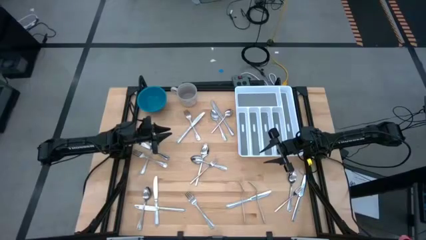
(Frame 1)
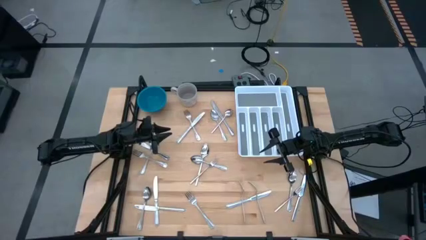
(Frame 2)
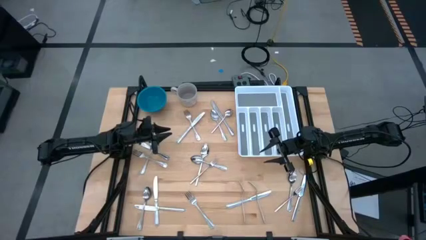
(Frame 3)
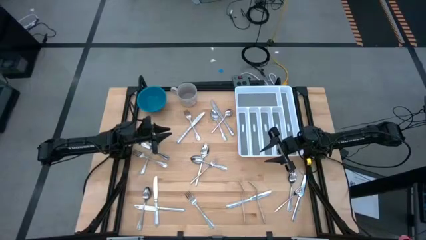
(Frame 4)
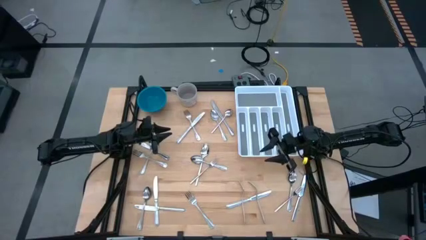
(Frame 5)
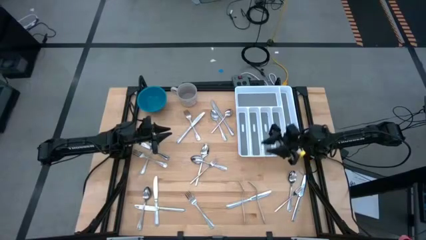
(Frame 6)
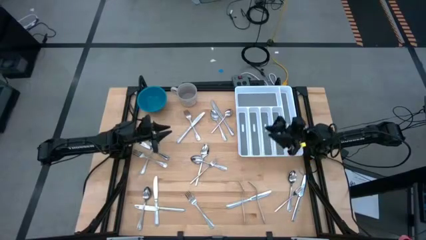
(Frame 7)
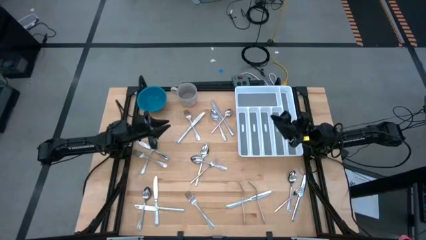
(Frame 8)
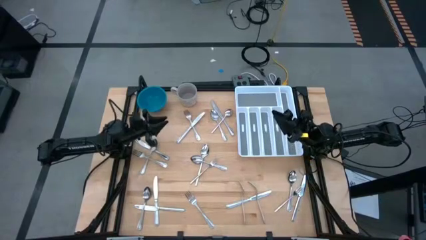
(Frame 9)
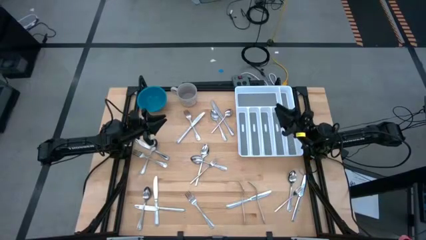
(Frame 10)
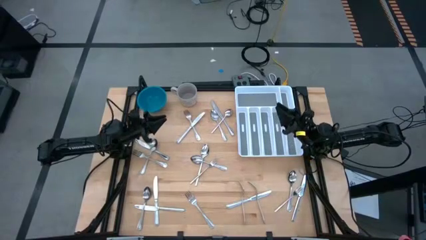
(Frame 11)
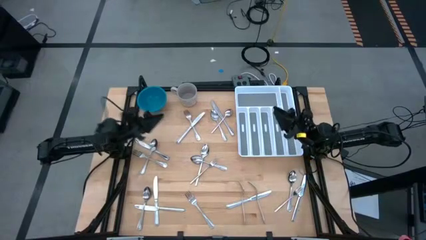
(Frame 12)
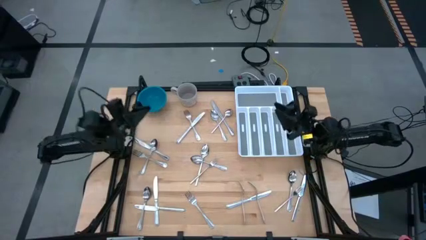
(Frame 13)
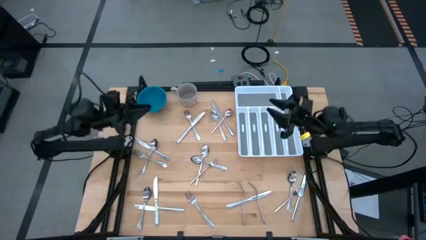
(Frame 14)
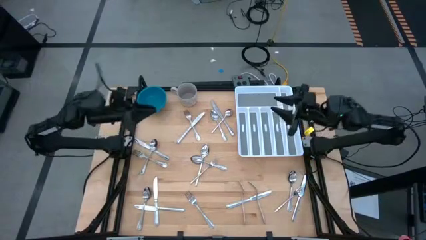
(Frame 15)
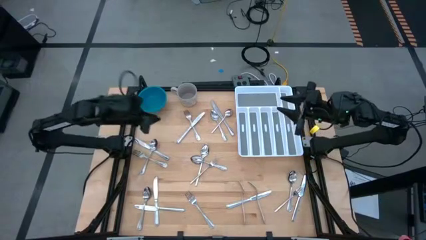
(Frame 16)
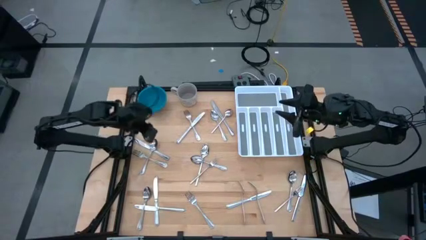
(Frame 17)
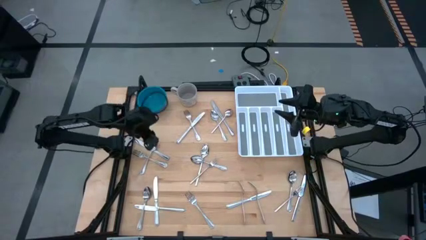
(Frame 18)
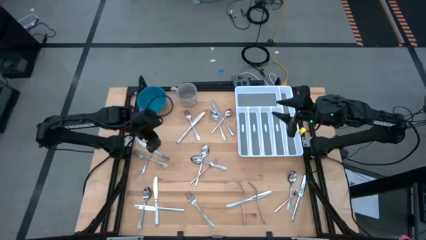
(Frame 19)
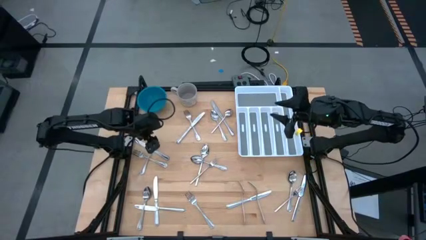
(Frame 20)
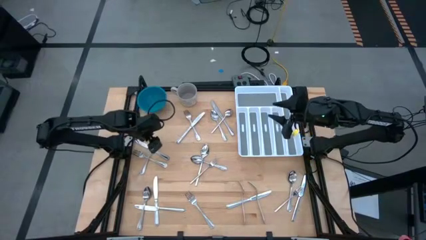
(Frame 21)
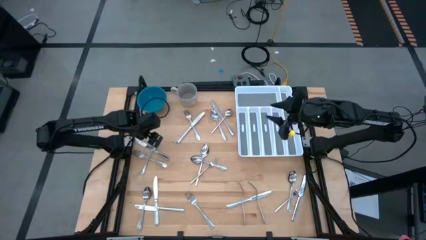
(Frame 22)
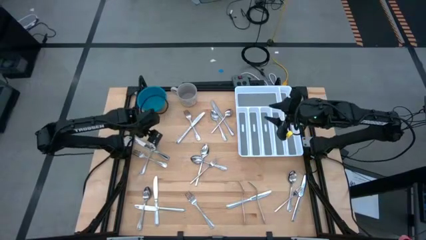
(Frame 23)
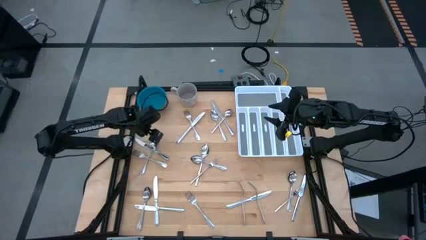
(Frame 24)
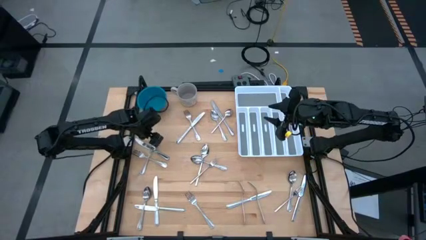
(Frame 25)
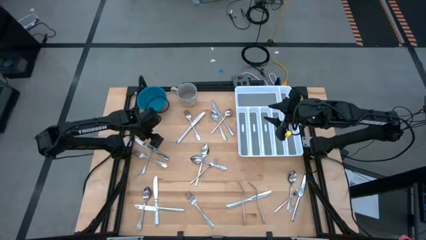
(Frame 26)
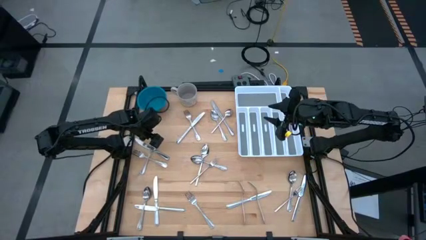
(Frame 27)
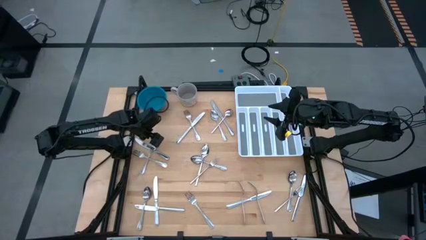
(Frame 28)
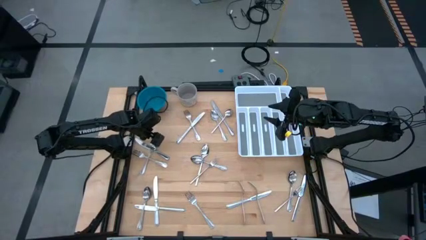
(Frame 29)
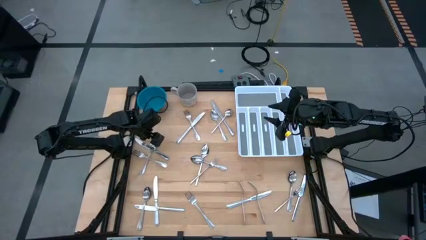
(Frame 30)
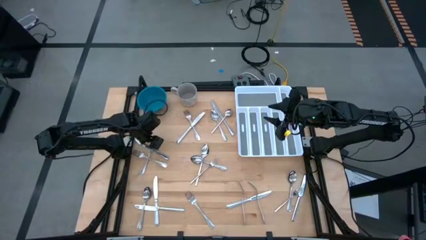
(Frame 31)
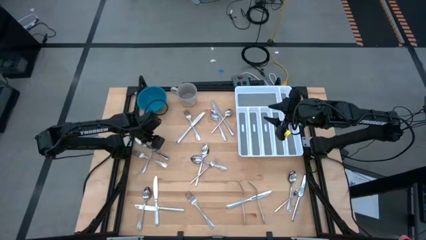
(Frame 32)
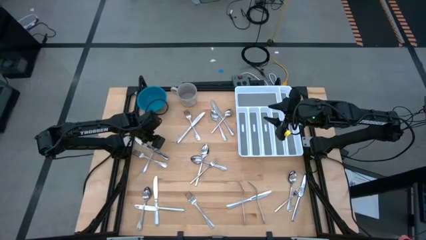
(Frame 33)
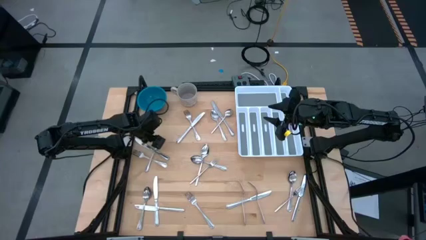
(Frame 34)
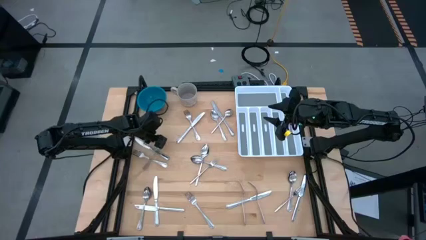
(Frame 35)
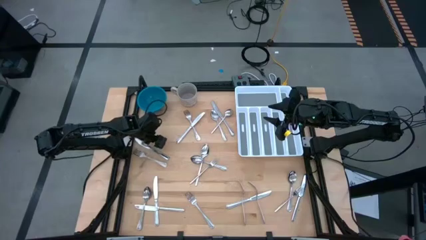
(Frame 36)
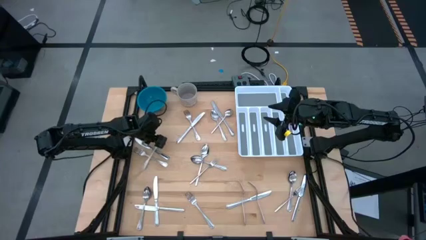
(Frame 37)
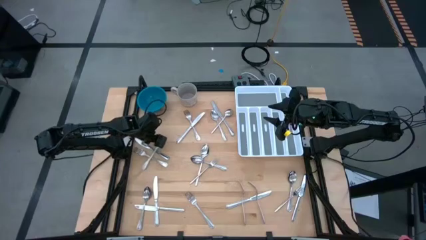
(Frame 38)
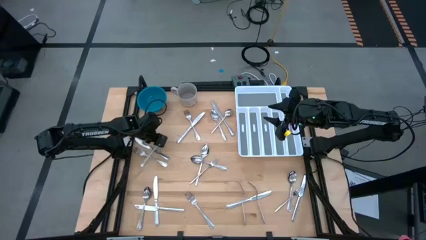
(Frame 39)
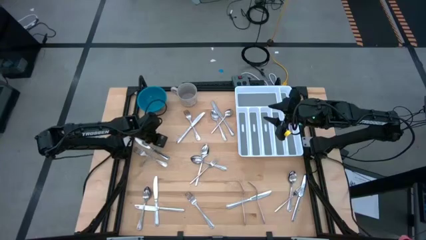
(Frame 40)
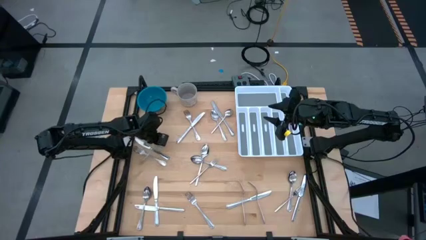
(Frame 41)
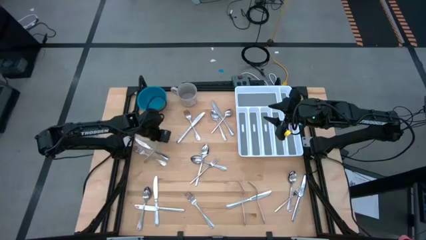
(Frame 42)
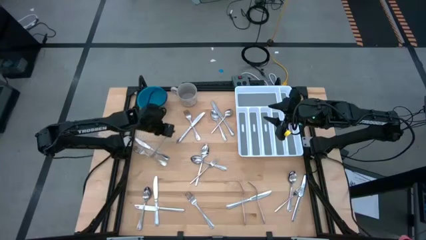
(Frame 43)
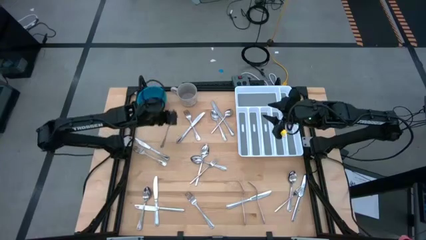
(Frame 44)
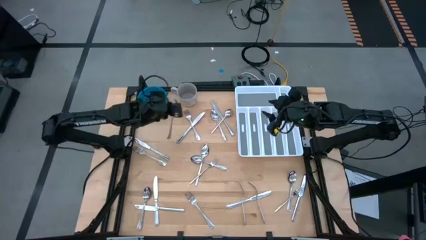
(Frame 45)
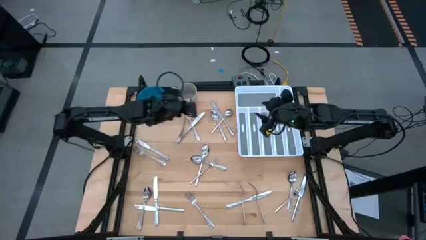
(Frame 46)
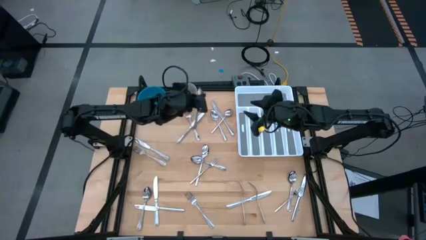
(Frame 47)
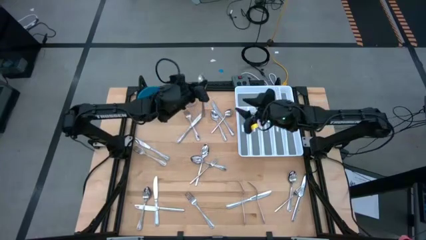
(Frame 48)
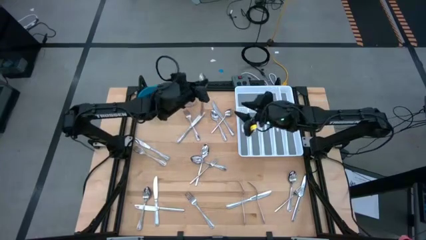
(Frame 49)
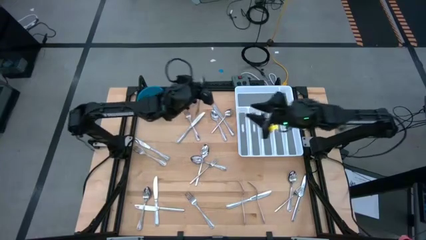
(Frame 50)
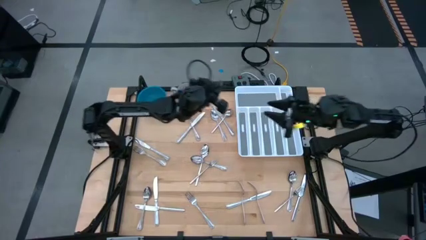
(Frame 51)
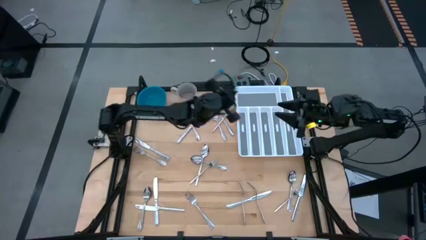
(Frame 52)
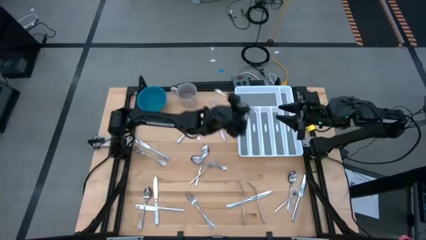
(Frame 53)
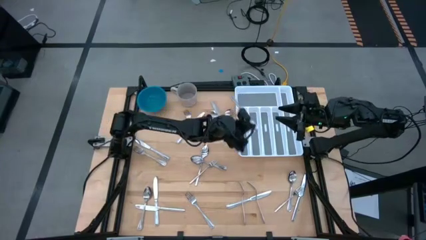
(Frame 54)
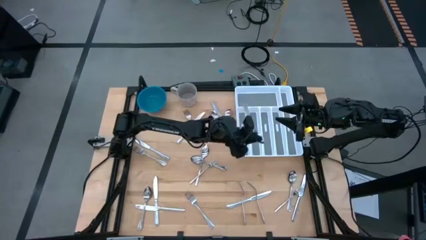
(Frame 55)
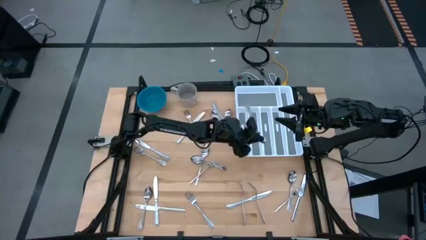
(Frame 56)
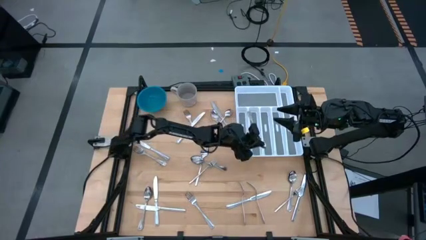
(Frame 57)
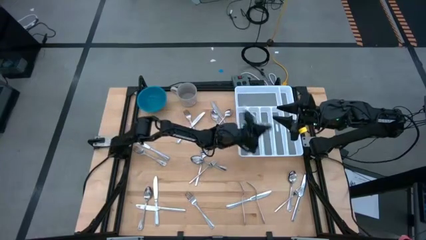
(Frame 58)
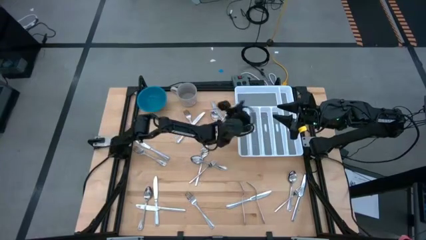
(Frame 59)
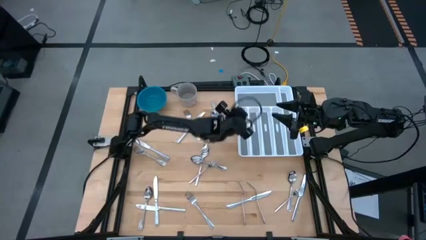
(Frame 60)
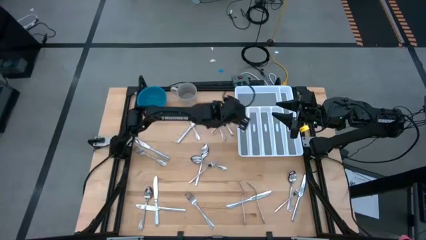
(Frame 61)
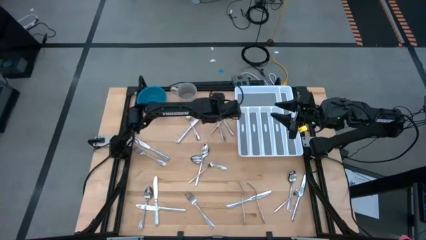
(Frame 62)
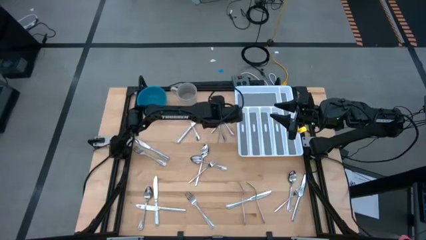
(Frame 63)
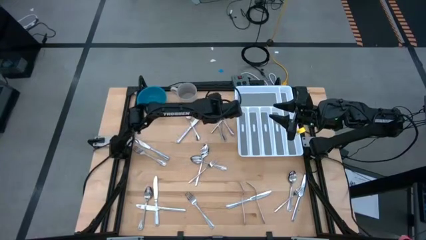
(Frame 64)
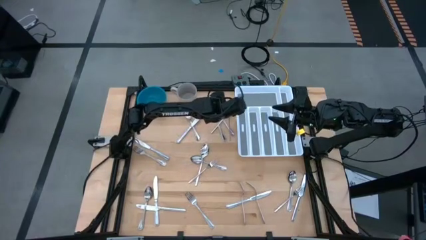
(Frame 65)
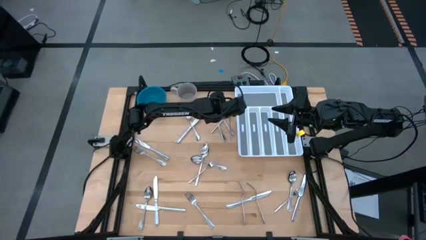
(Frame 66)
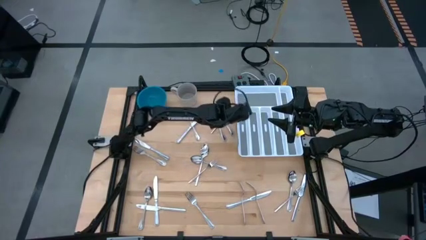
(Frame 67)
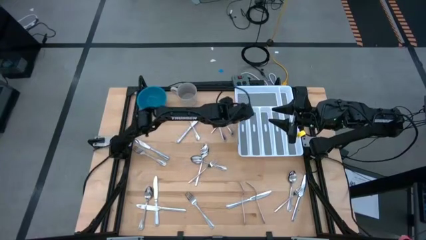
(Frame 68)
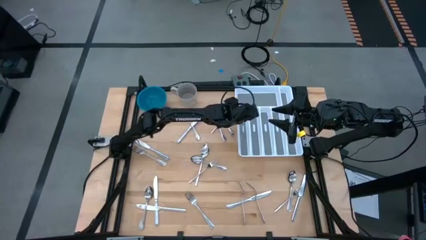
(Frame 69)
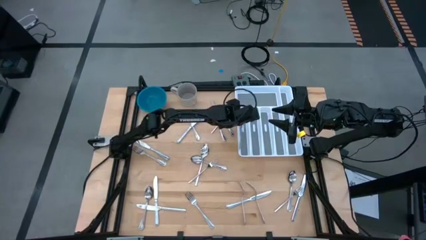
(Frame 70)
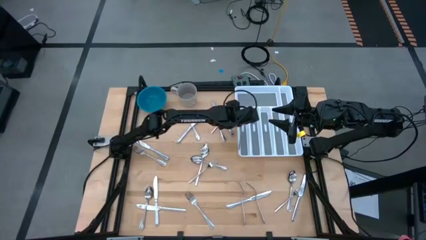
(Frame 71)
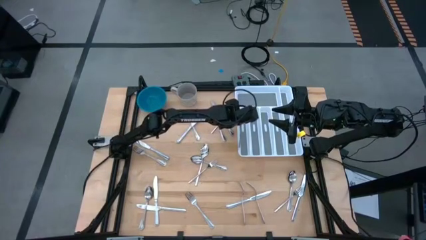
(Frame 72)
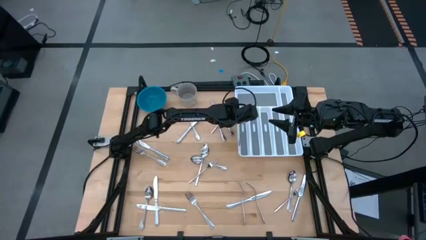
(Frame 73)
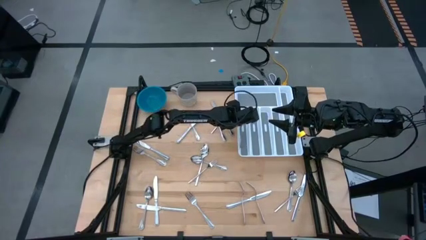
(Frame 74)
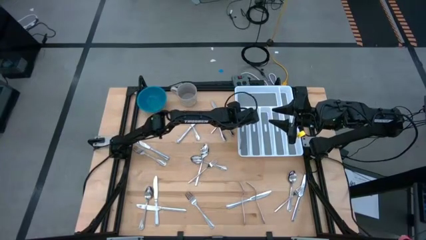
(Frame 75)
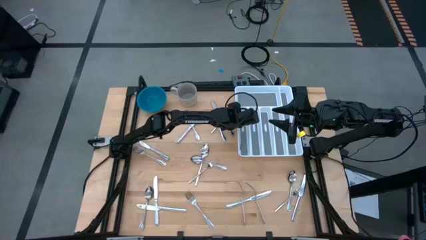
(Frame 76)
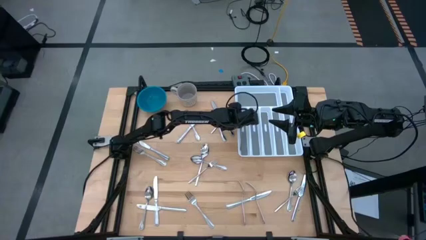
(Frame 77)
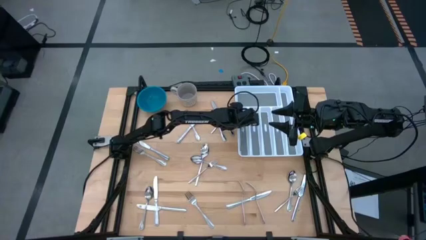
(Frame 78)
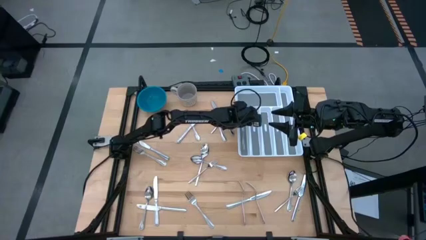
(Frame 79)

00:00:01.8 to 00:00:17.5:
Task: Sort silverware
Put the spoon in the silverware tray
